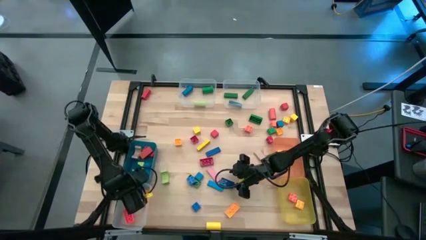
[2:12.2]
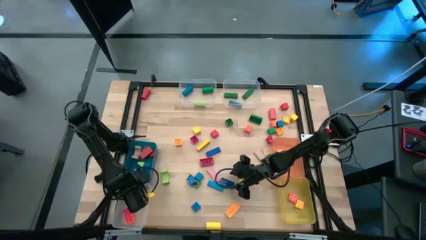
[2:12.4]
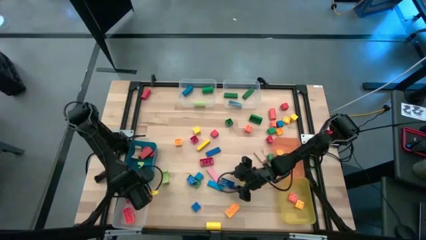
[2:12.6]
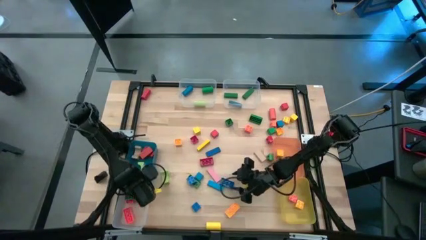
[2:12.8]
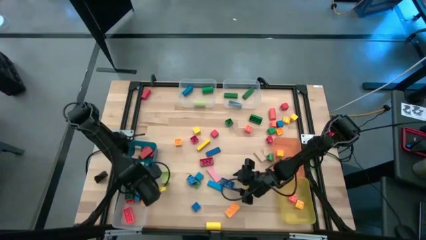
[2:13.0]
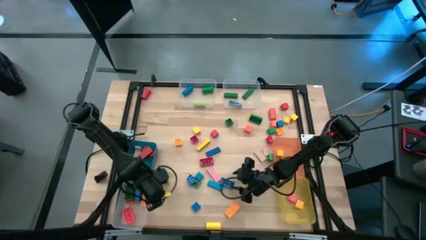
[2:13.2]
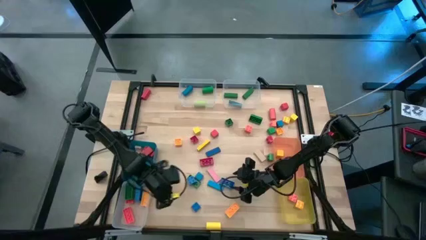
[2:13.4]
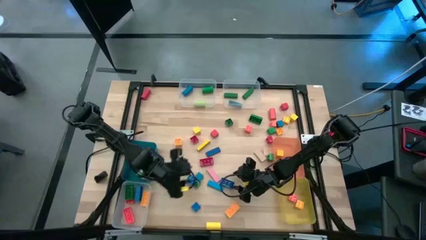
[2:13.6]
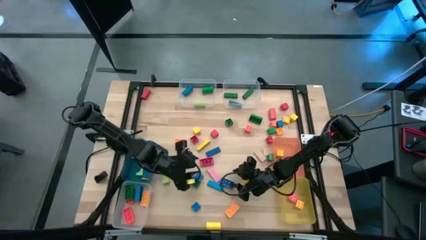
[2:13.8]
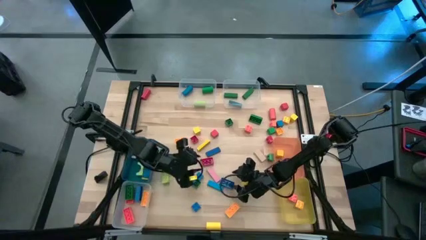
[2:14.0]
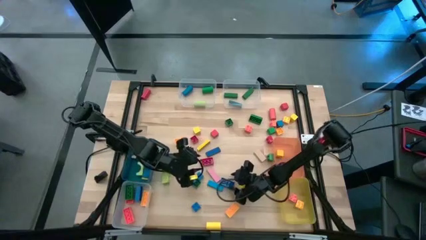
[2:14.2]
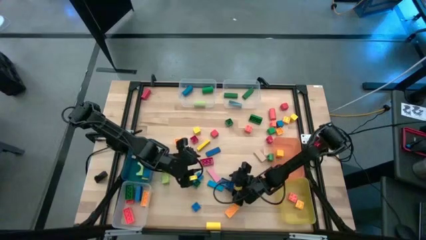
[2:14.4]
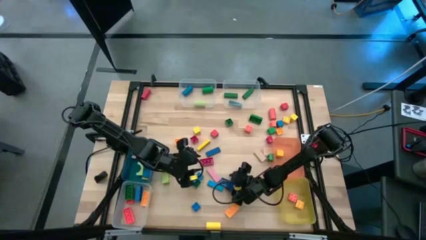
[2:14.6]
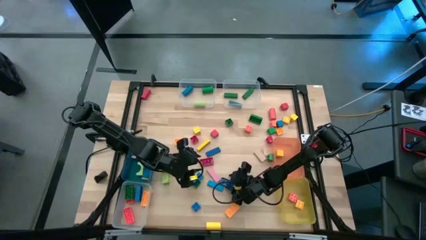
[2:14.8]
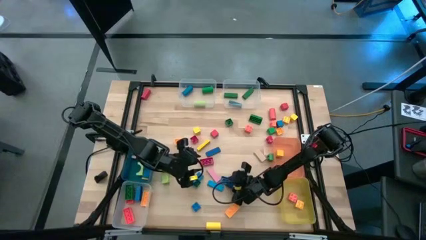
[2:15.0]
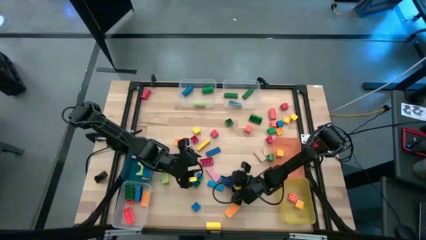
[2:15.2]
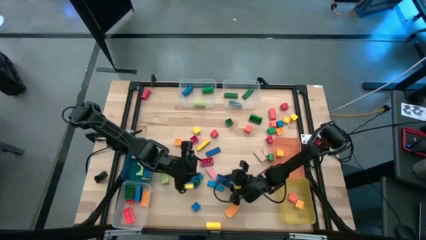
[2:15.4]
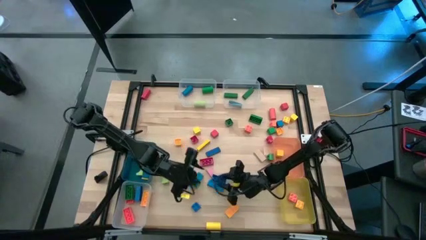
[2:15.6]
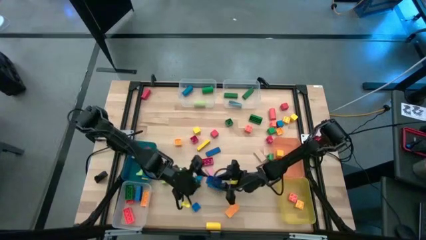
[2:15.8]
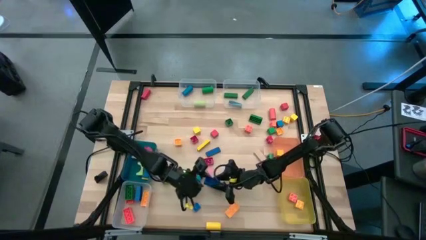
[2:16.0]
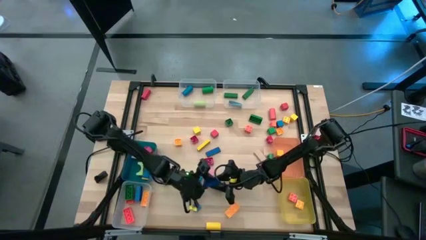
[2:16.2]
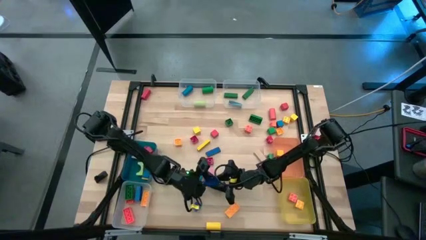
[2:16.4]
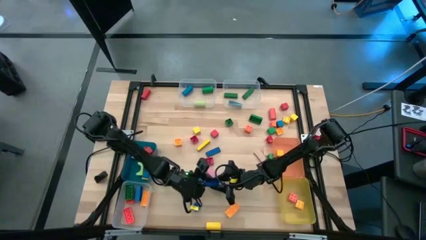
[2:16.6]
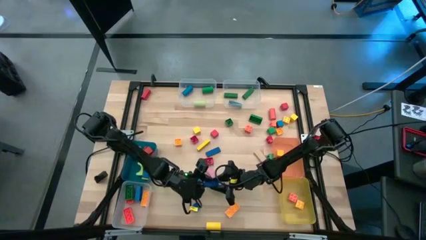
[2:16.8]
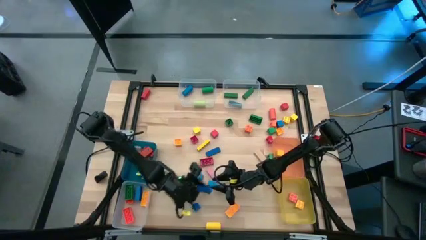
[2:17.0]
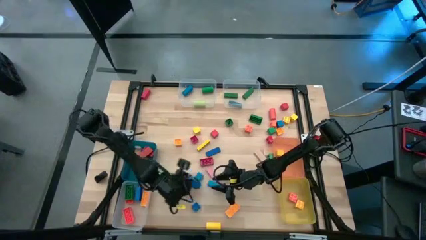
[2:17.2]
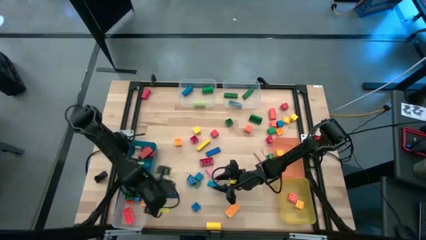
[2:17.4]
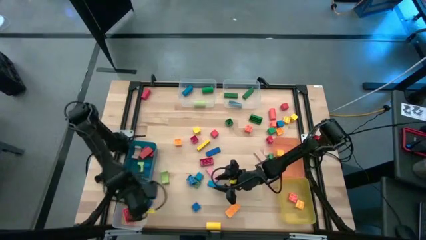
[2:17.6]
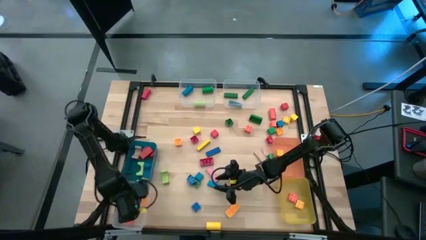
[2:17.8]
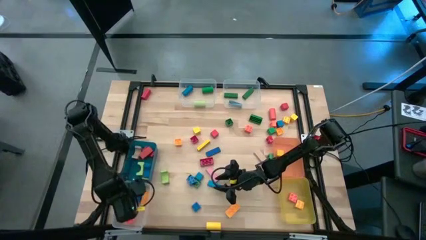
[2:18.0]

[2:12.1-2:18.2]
Task: Sort blocks by size
Put the blue game piece into the bottom left transparent bin

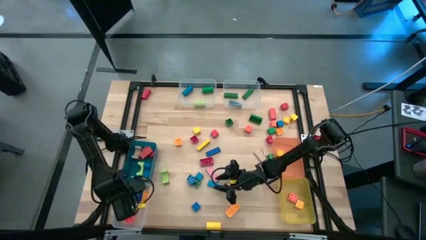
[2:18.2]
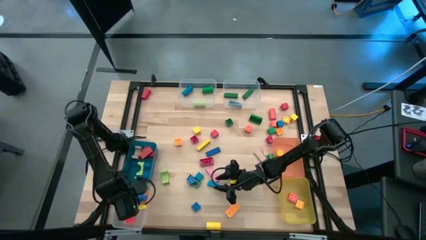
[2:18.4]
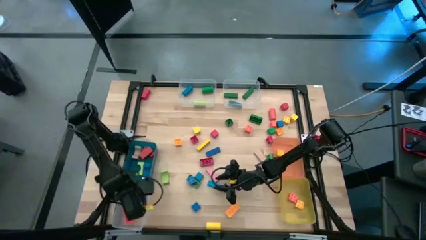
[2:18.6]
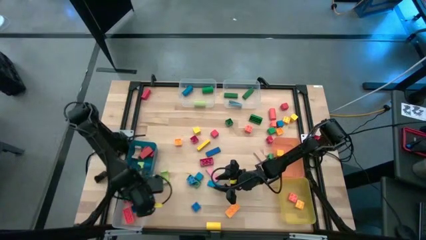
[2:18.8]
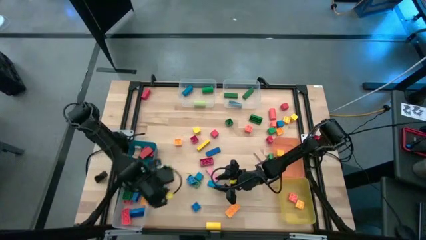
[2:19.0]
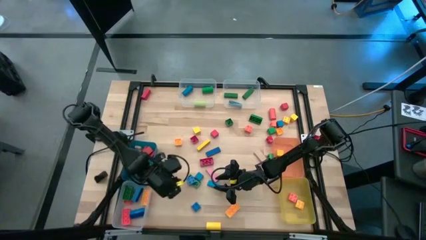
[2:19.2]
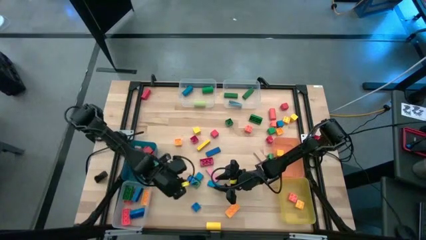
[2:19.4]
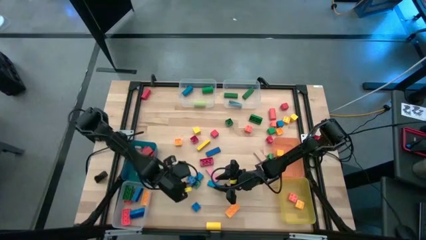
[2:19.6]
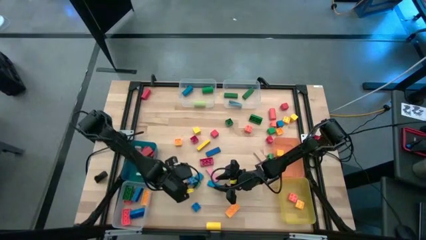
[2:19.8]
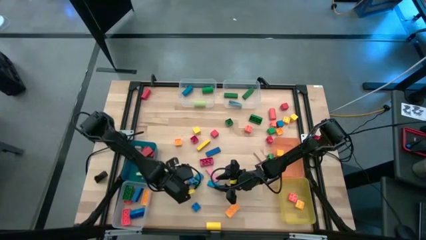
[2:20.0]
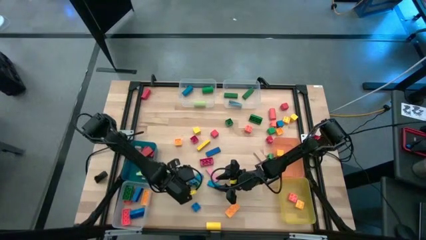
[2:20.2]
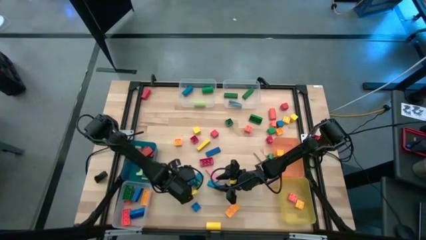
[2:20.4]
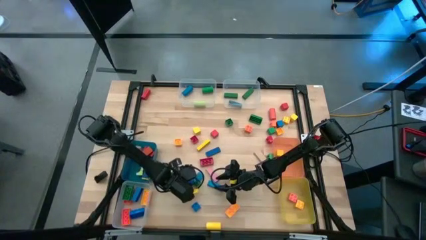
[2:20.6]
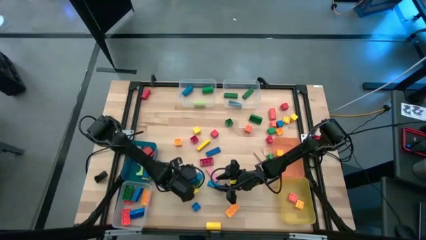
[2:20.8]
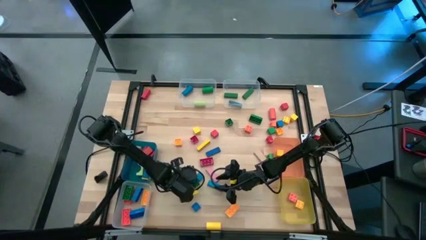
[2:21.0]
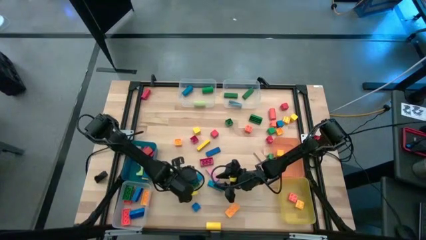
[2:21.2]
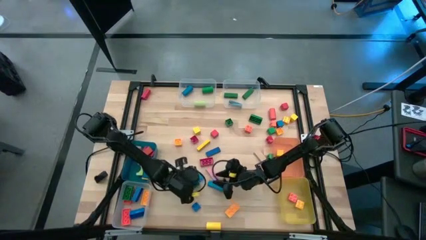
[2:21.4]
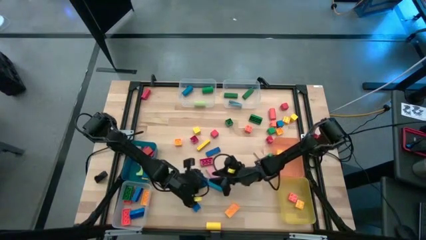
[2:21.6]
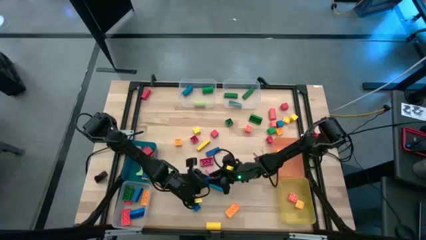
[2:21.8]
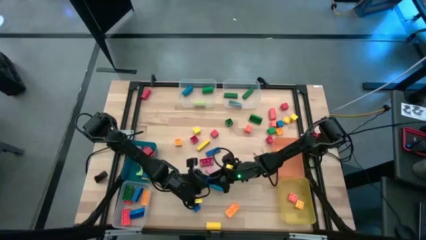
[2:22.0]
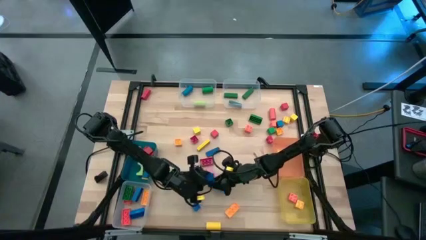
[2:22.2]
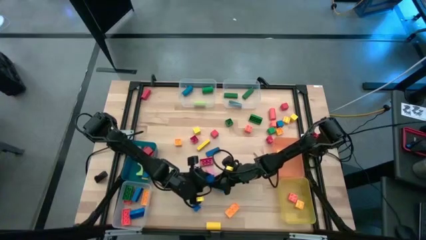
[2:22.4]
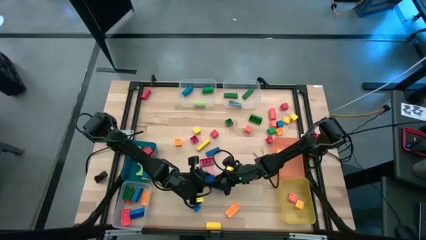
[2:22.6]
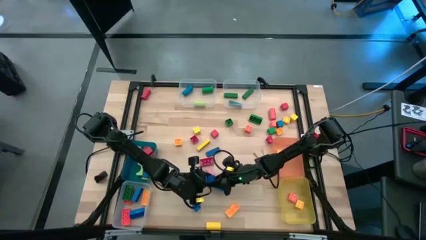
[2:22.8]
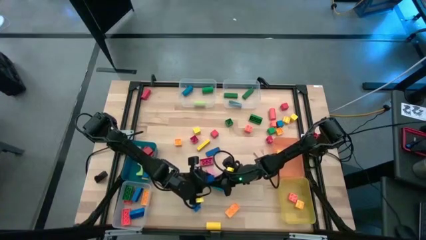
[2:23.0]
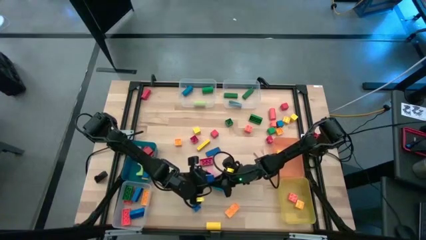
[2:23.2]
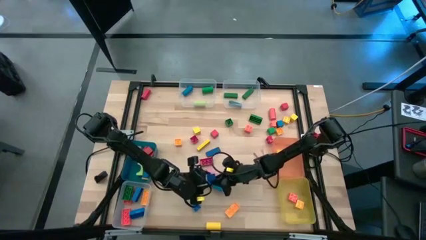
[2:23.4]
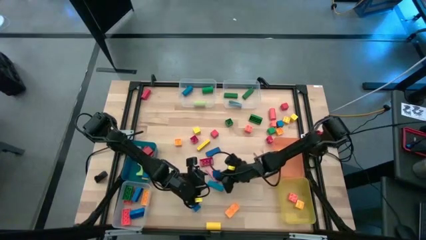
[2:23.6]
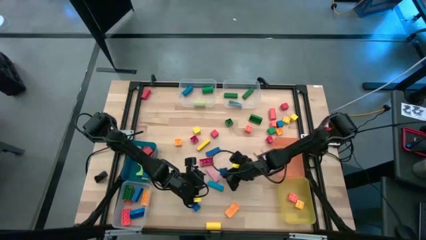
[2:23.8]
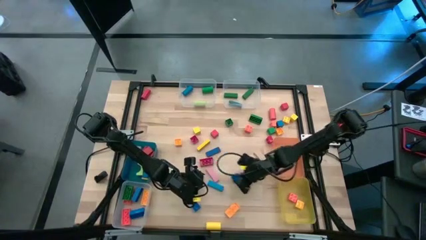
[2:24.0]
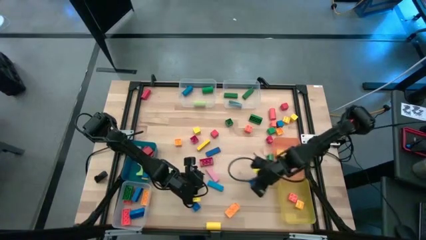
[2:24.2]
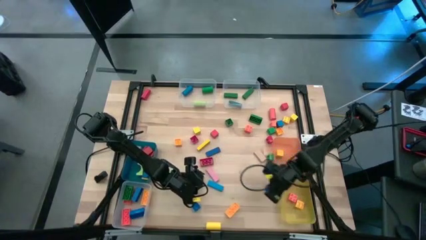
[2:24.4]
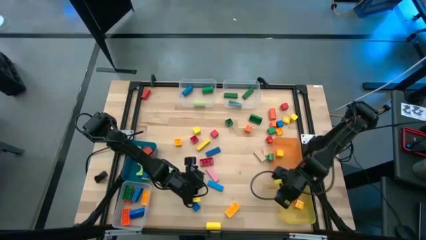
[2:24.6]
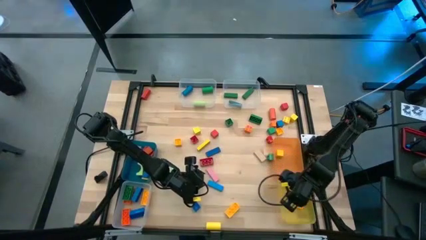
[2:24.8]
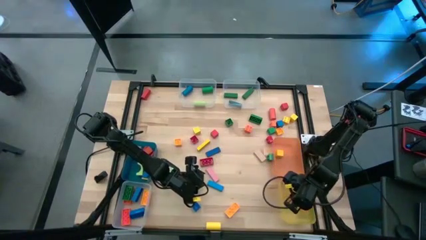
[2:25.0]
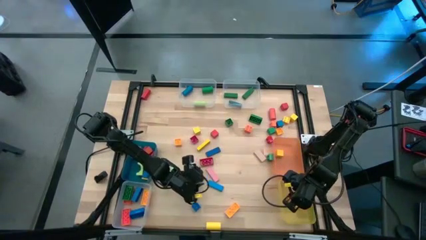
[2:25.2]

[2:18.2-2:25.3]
Put the blue game piece into the yellow bin

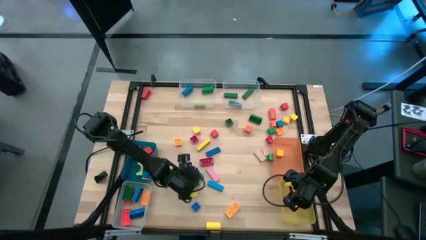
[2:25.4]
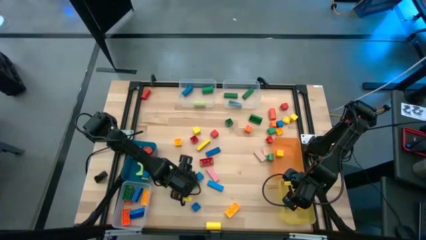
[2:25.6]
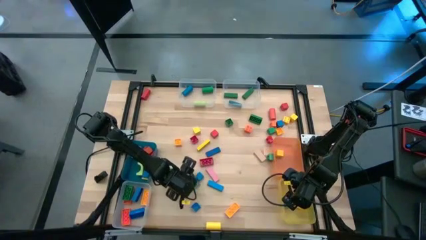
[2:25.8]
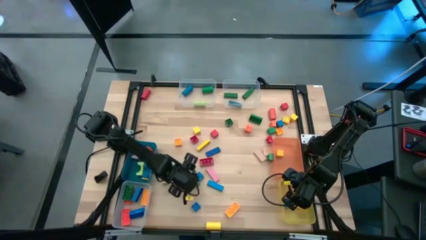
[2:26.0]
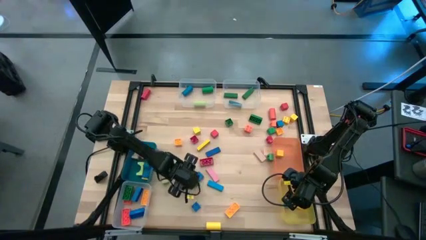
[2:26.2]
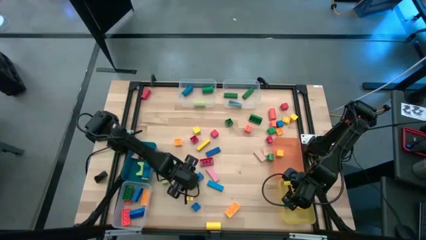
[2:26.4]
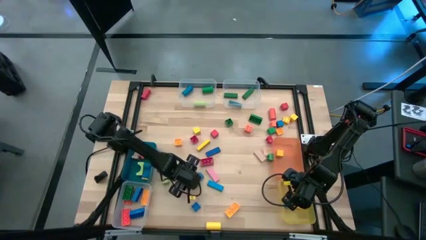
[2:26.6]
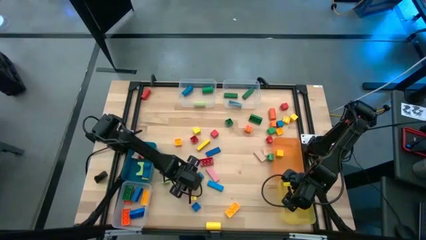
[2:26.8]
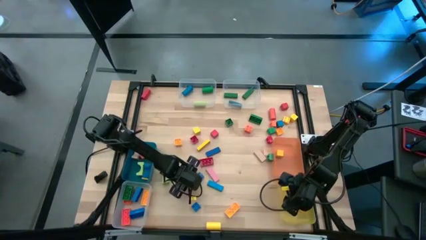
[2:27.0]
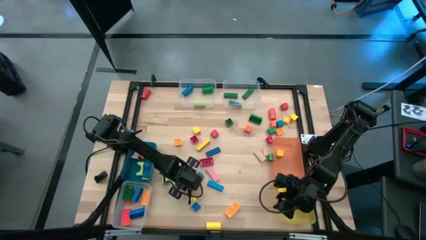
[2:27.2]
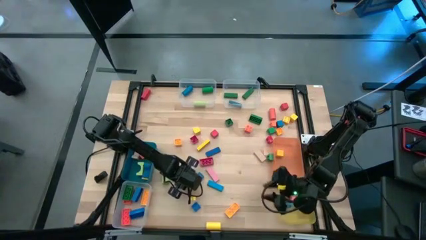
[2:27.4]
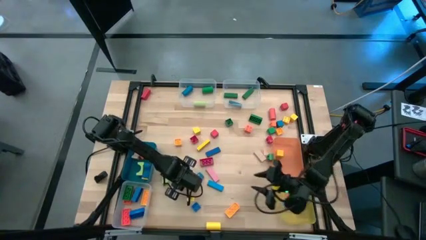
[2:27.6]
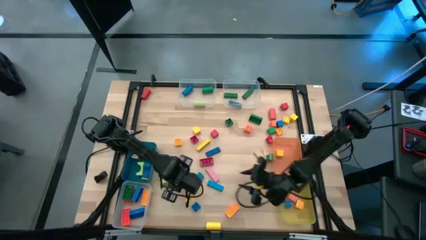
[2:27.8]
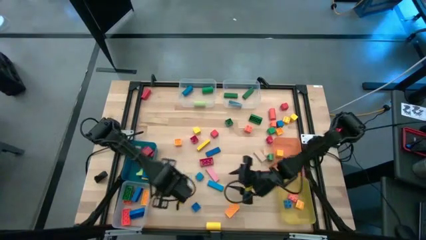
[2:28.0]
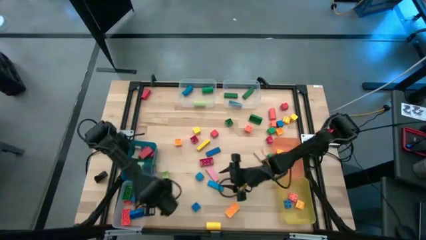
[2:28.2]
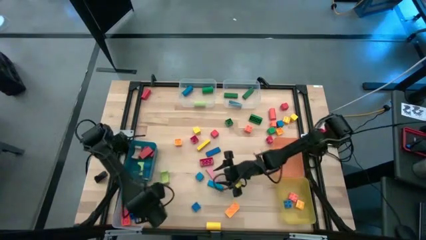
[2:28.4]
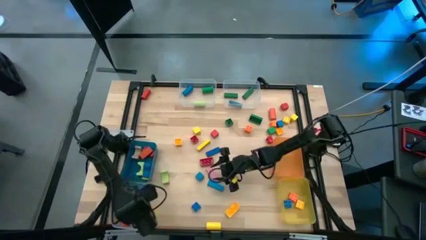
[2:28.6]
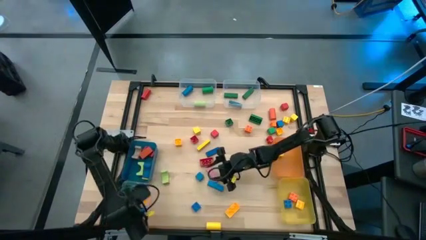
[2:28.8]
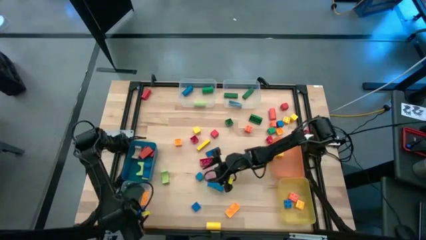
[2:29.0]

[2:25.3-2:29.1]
Put the green game piece into the bottom left transparent bin
